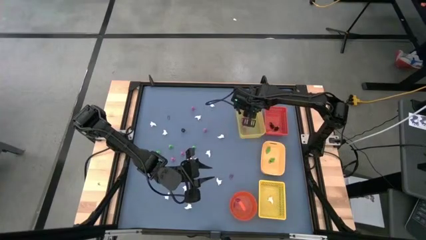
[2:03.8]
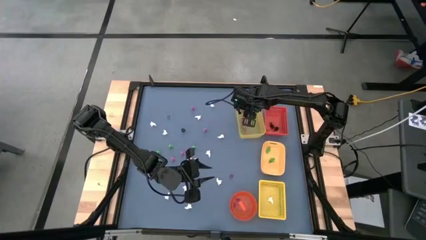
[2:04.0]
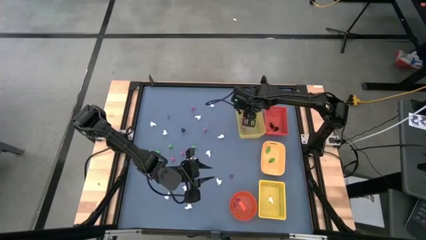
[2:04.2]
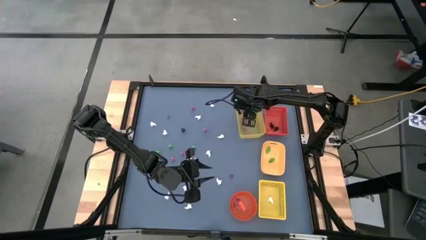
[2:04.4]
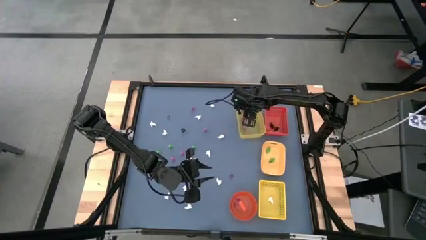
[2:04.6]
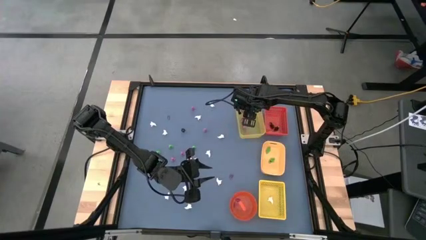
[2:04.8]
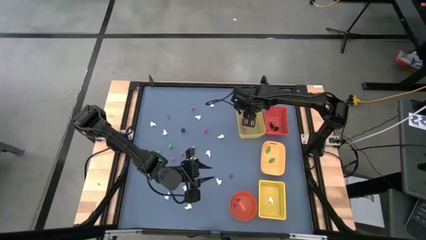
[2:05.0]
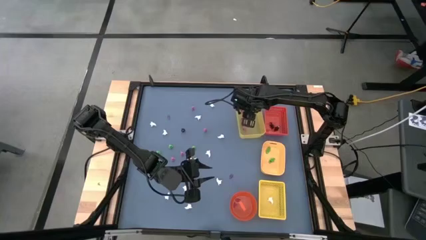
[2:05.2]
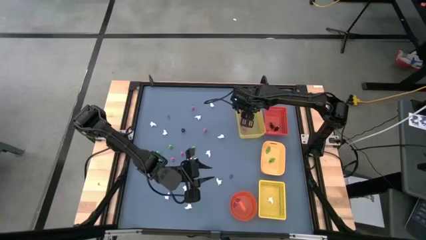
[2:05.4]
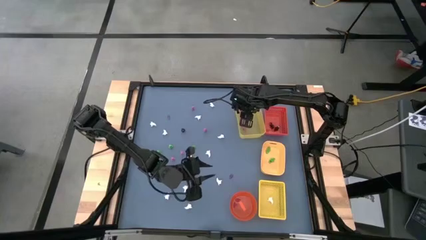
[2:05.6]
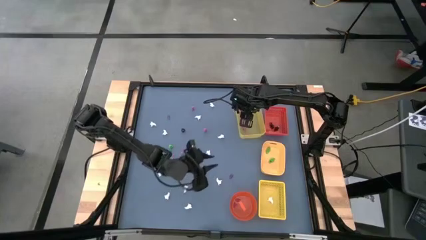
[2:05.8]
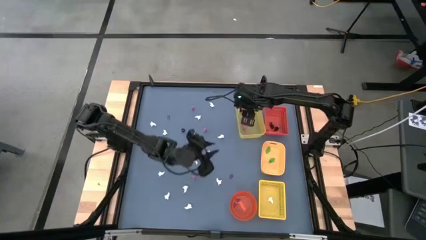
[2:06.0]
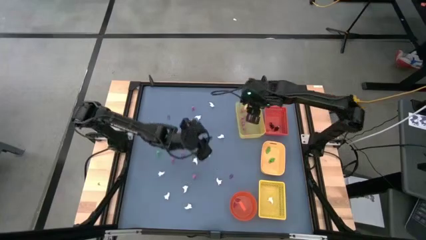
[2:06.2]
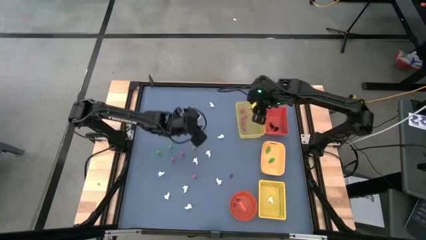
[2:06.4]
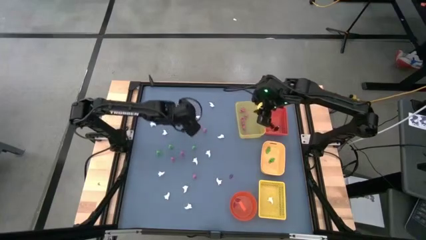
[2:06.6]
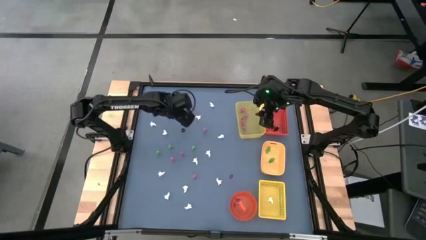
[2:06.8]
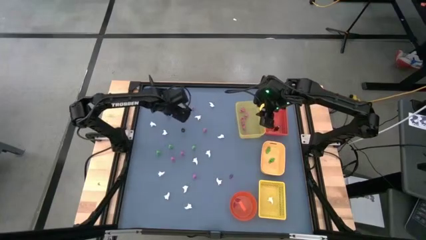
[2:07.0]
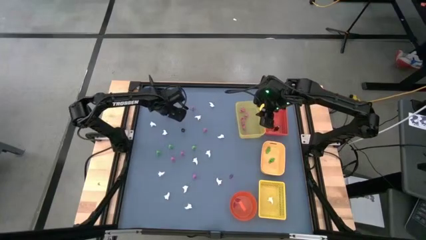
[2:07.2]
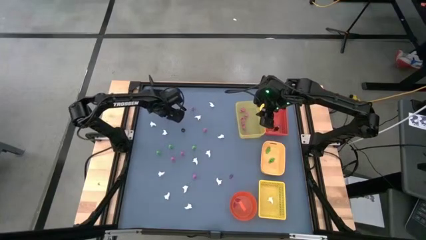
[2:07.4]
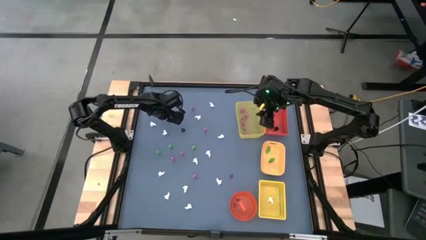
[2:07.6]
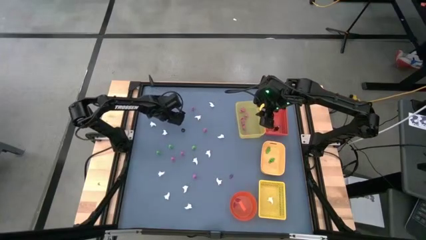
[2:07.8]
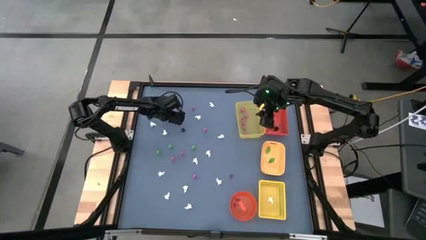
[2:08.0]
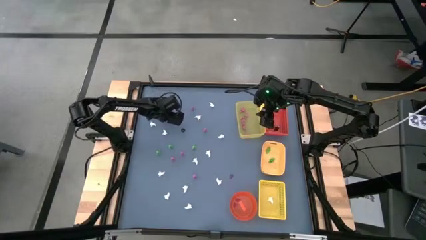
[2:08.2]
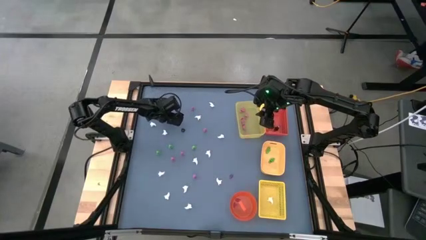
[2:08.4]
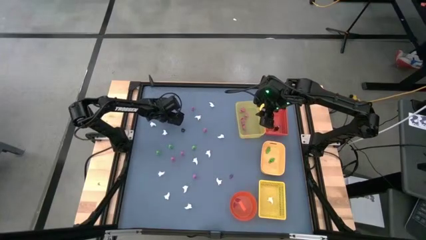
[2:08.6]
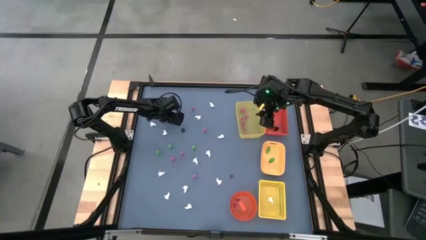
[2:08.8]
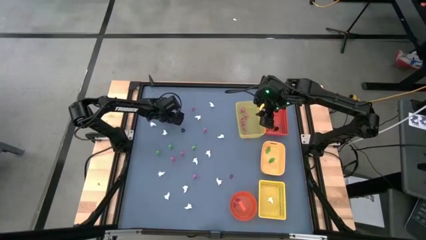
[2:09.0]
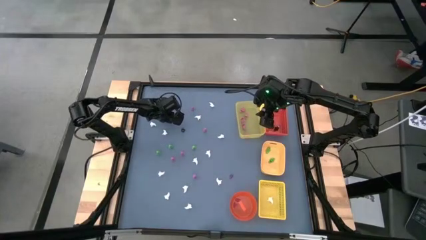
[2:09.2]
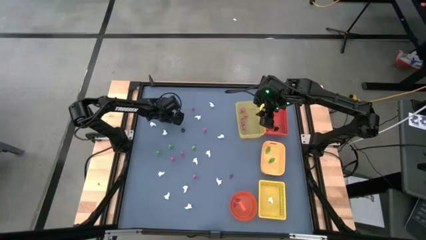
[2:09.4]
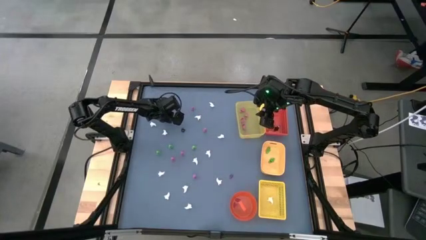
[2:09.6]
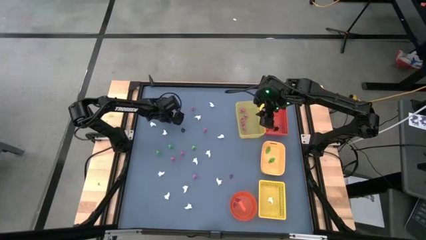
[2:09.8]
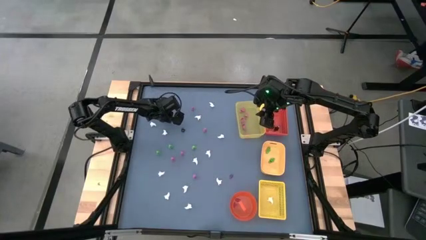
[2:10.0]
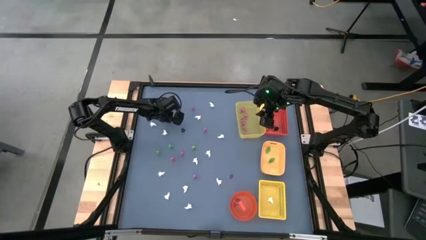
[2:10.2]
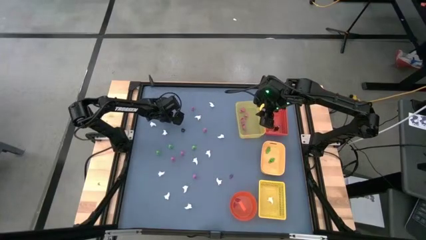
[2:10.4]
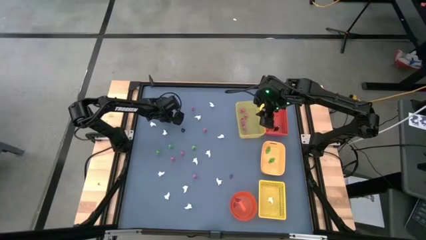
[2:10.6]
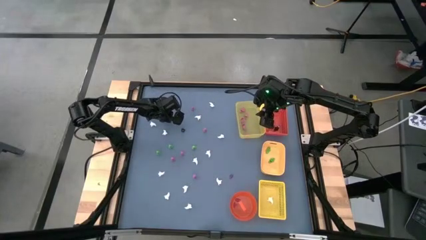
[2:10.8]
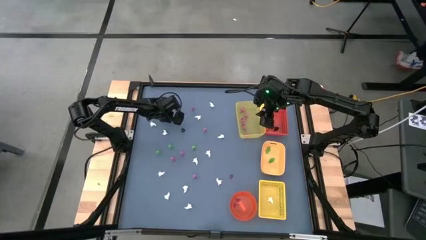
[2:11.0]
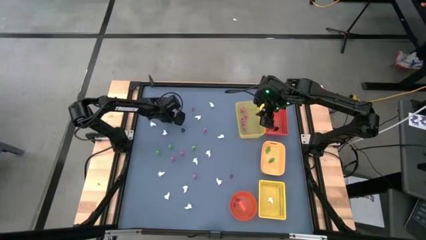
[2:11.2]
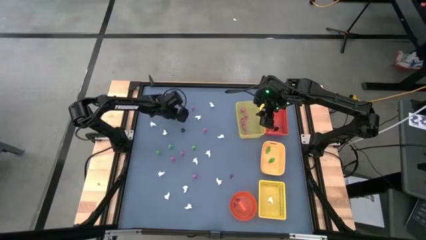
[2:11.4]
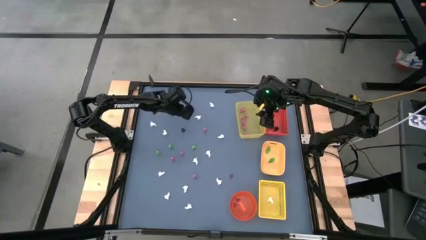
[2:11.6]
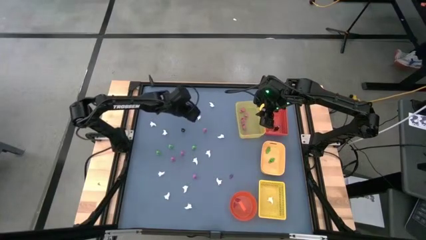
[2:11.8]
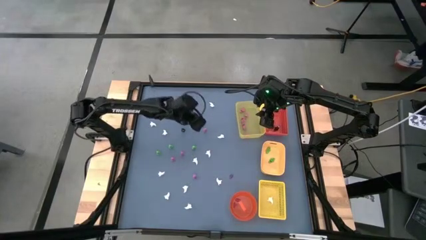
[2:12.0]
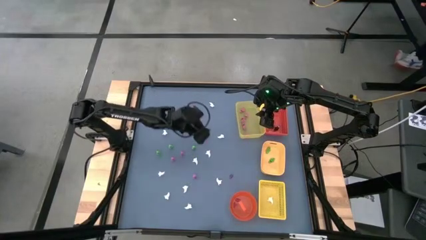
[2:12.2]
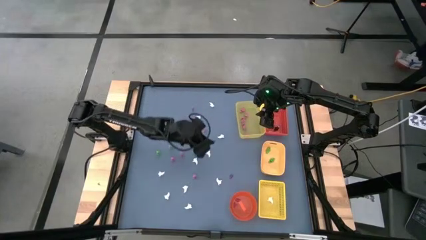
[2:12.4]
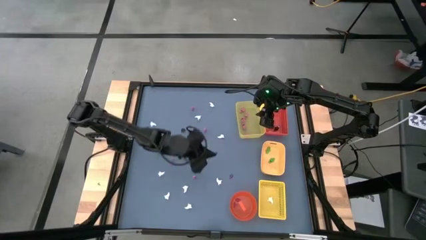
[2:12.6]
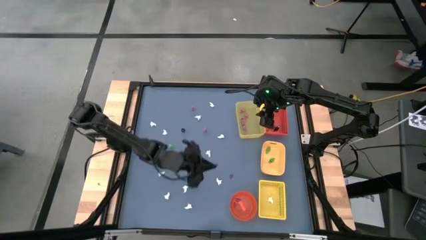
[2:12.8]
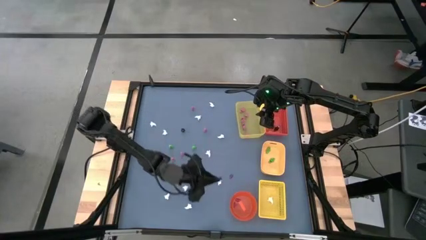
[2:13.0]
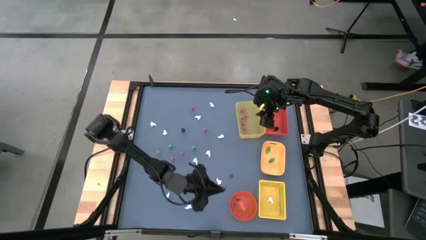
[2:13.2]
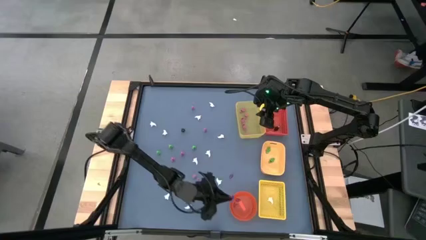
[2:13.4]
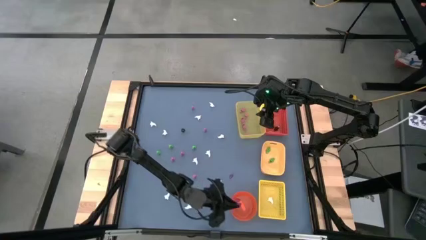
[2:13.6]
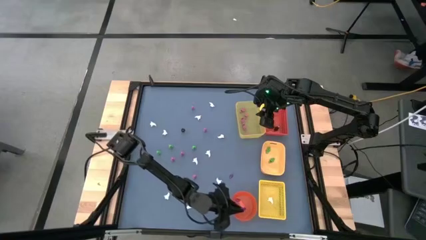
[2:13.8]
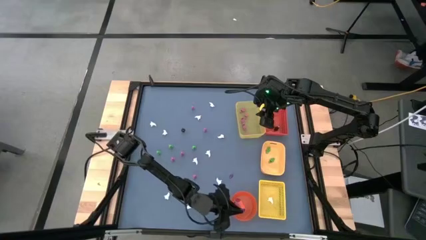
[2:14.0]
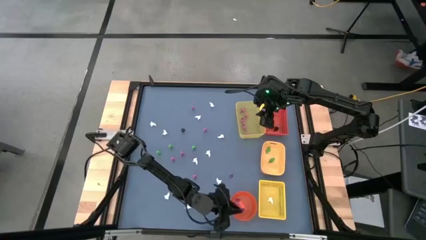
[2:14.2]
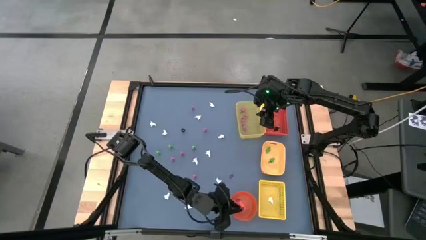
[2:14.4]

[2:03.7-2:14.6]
Task: Sort Halloween decoration
Put the violet witch hat toy into the orange bin
